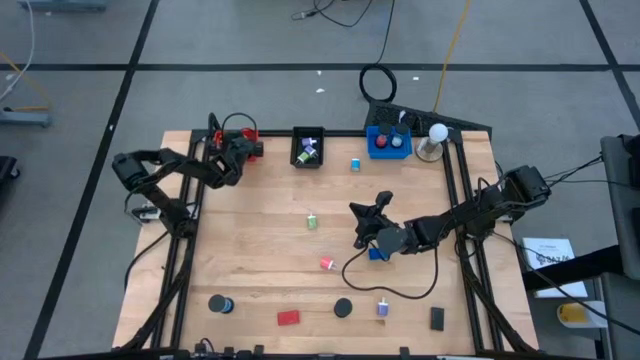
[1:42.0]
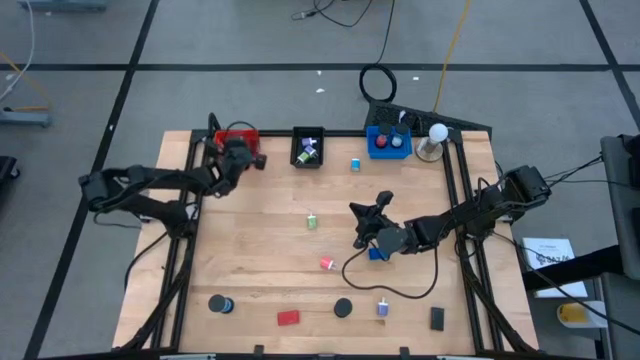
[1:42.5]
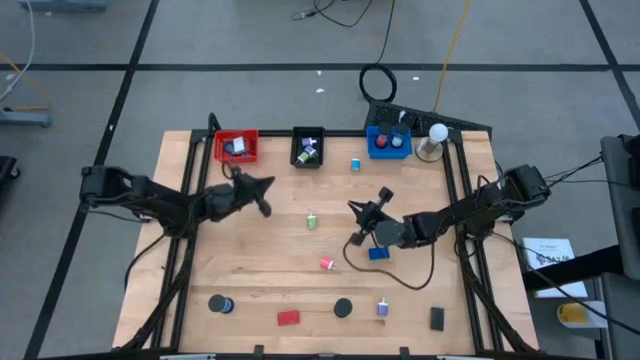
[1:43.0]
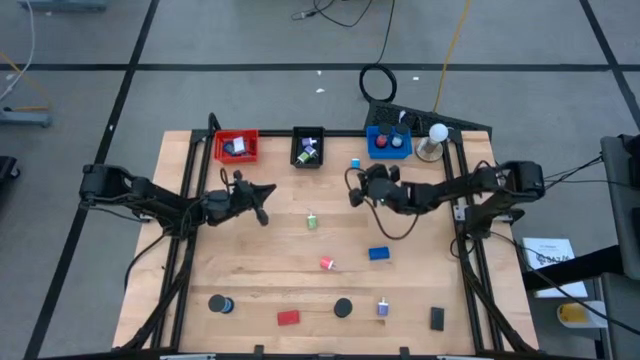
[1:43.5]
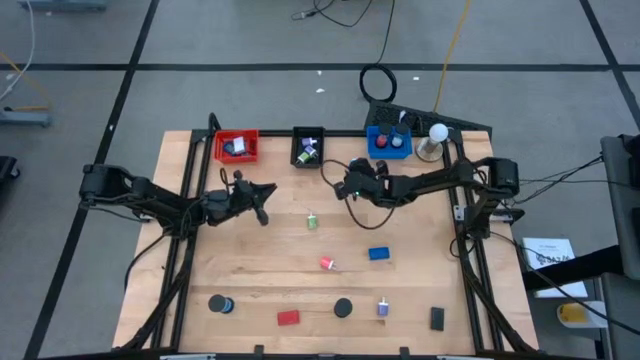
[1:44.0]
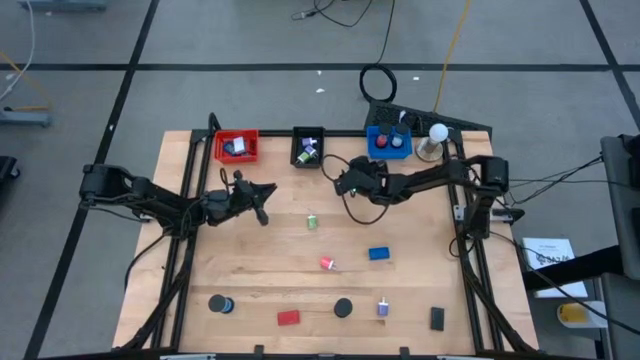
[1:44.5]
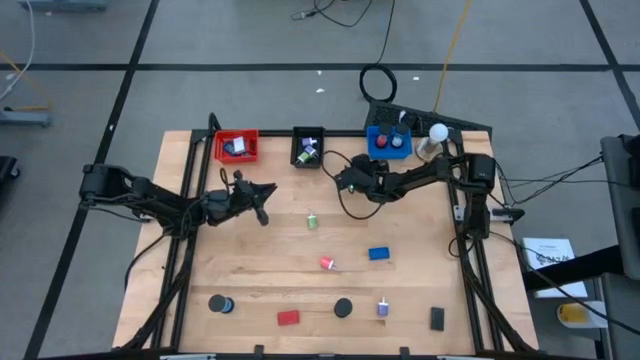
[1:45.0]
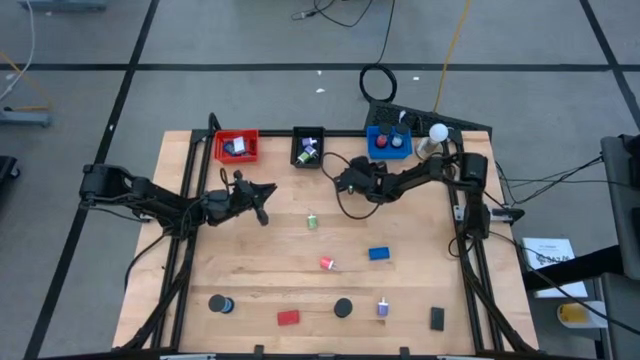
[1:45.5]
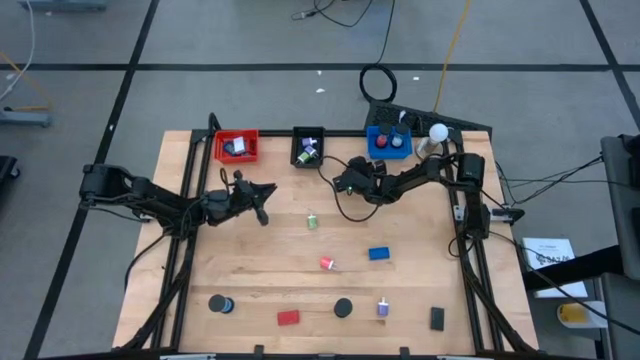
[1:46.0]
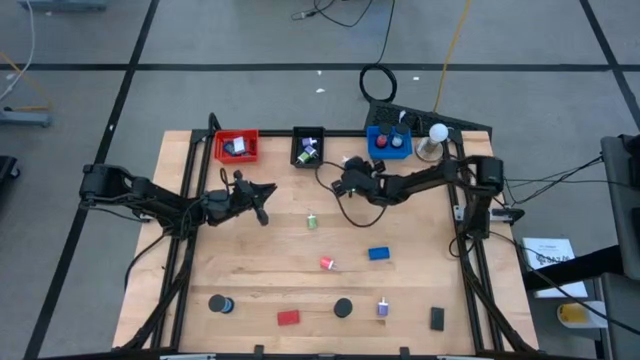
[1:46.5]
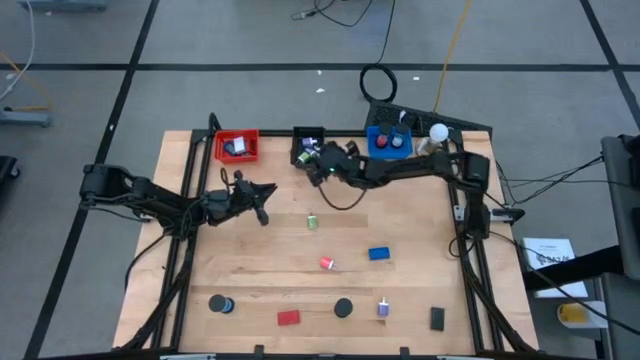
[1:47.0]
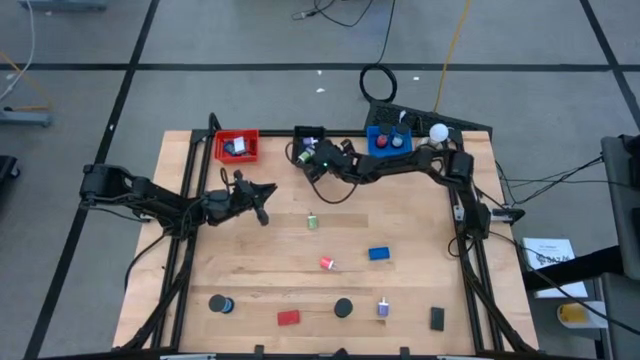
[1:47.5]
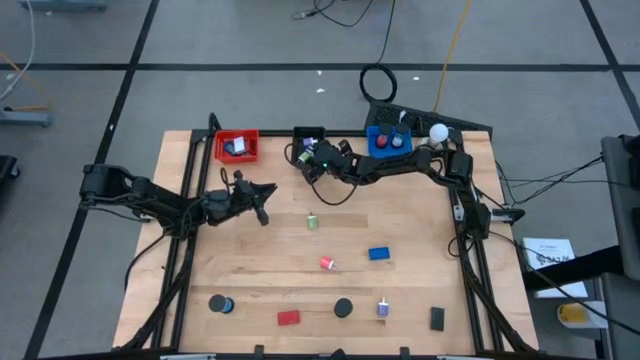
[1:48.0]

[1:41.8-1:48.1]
Task: Pick & Place Office items
Put the light blue charger adapter head into the black bin

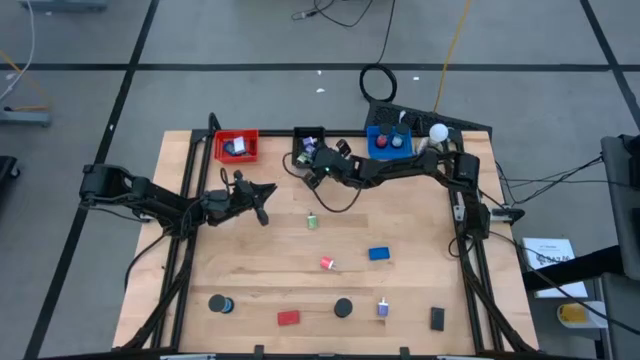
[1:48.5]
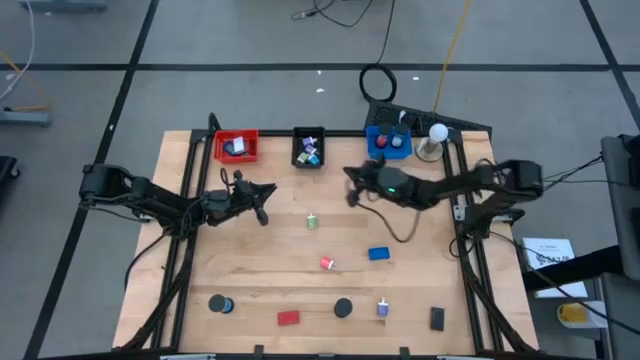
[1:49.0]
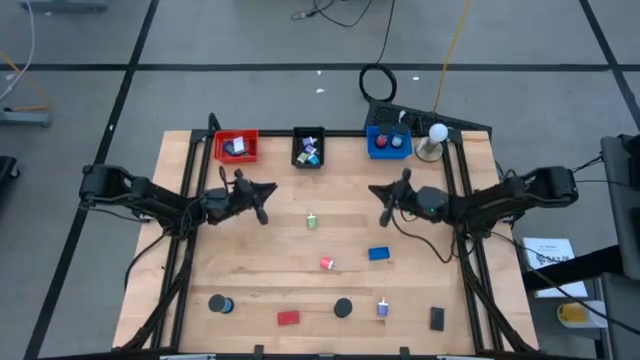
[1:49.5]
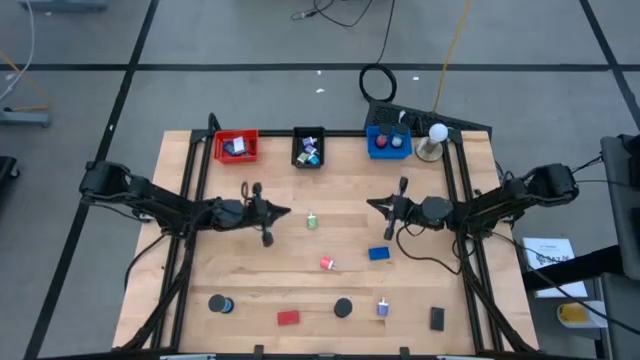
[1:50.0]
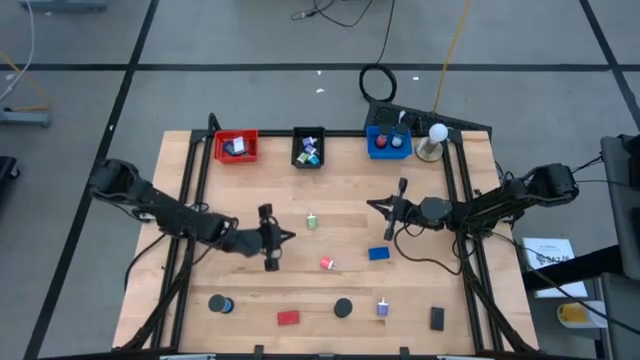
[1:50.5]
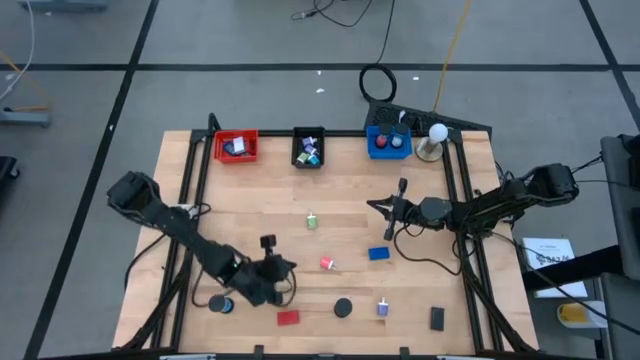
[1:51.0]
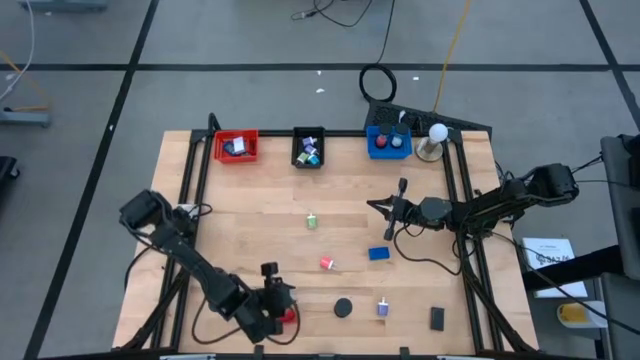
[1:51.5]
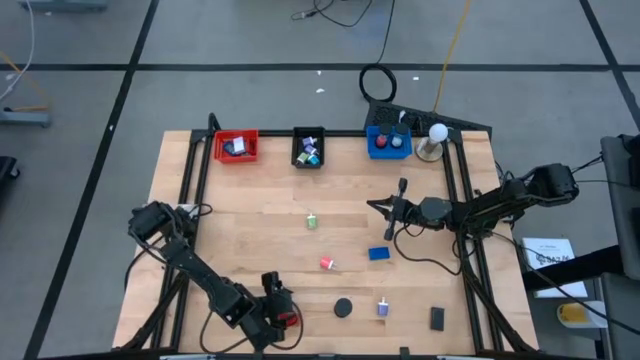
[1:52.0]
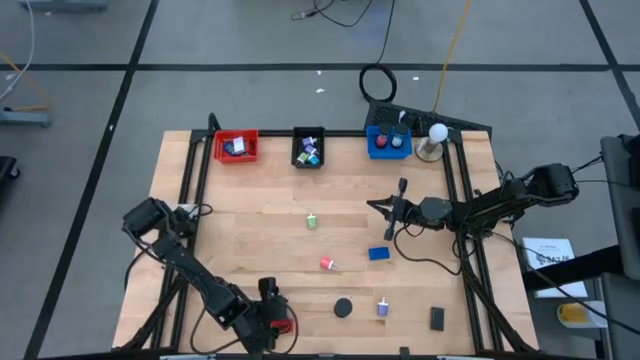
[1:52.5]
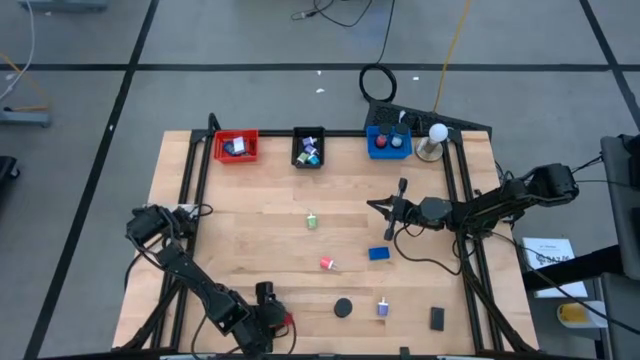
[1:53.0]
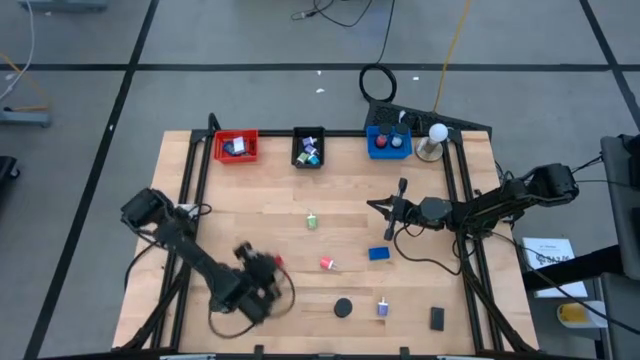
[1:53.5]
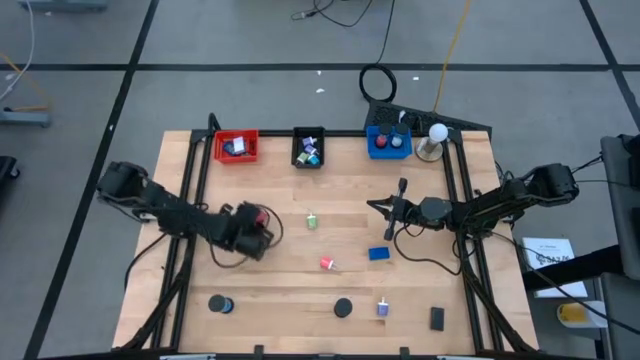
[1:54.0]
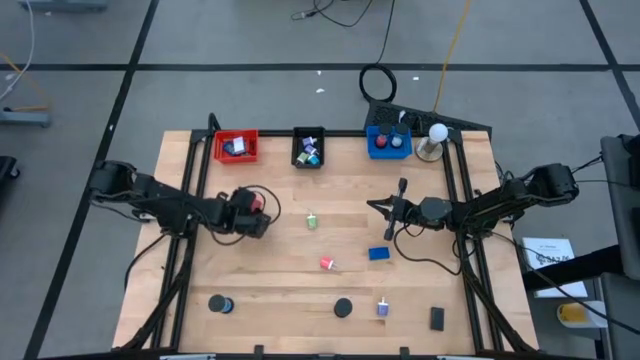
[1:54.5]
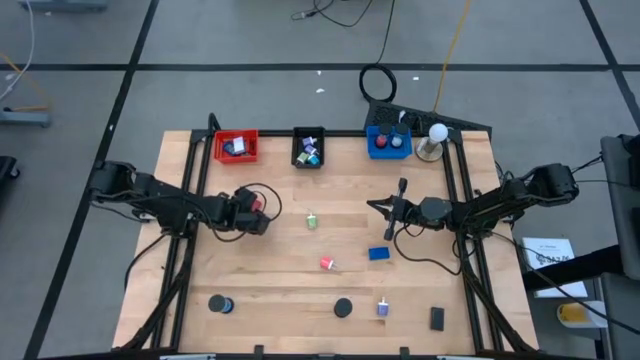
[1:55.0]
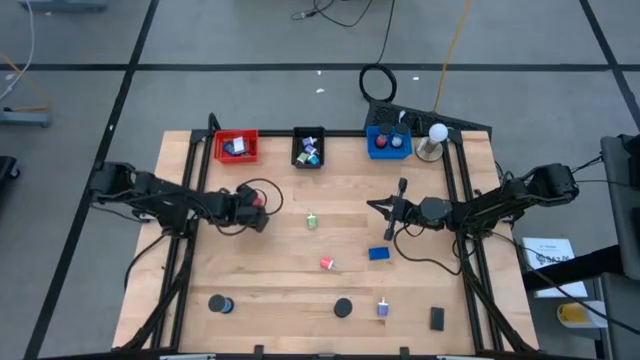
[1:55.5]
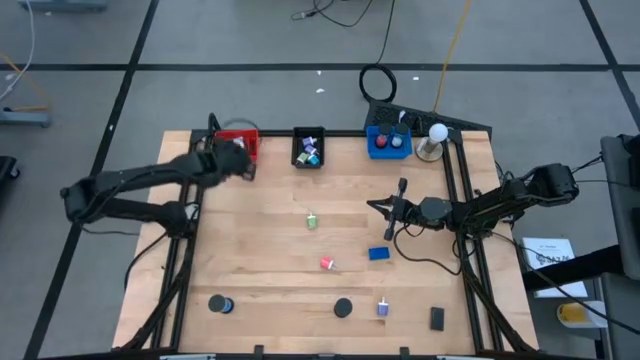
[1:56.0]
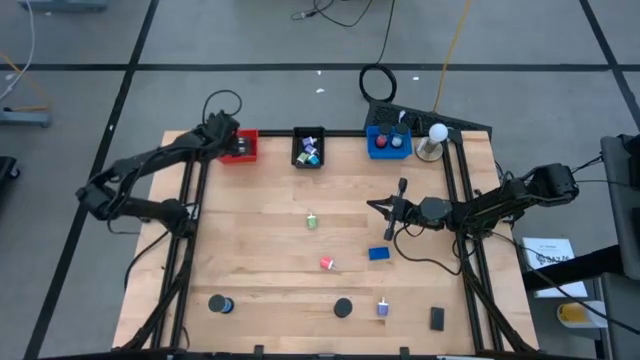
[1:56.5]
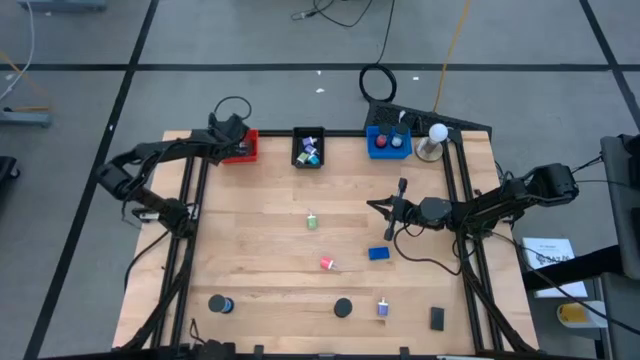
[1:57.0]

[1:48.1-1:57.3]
Put the red digital clock into the red bin

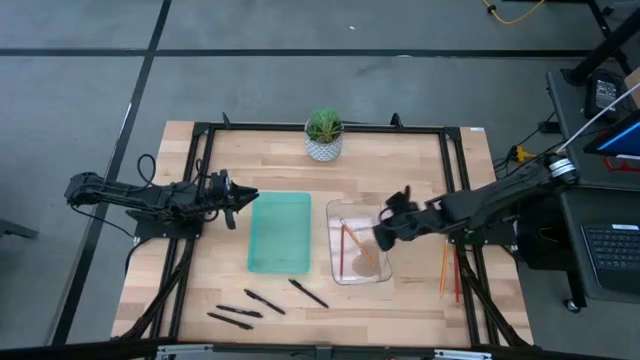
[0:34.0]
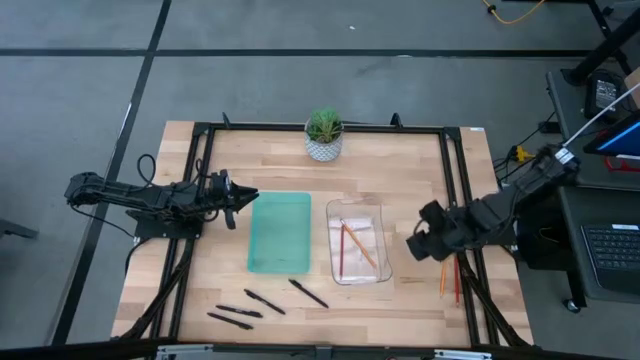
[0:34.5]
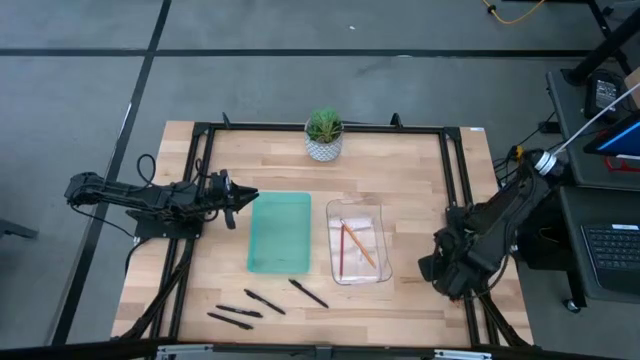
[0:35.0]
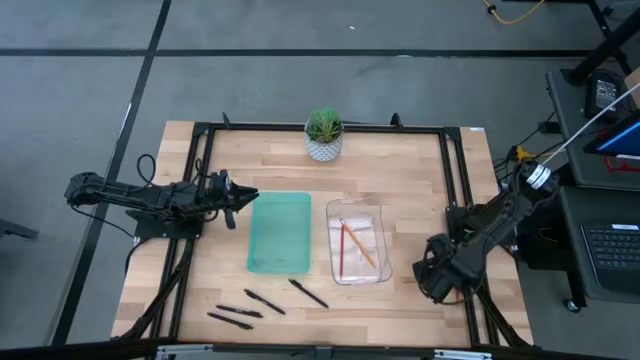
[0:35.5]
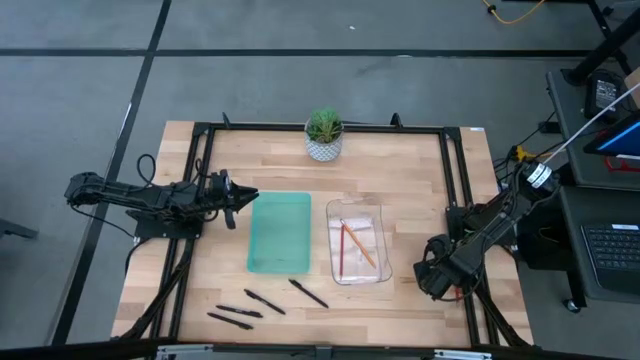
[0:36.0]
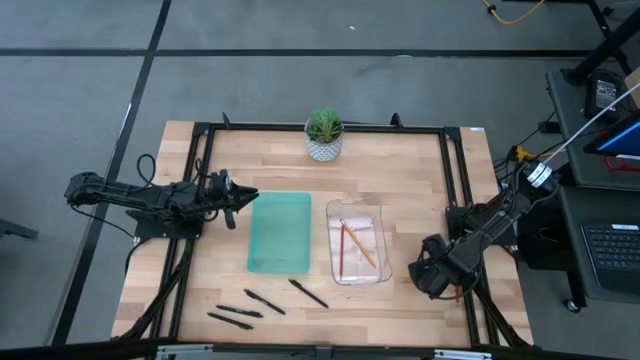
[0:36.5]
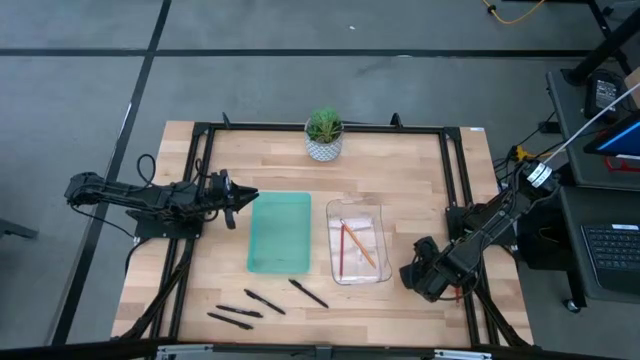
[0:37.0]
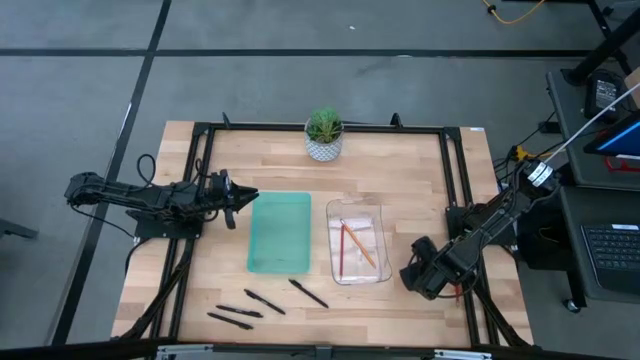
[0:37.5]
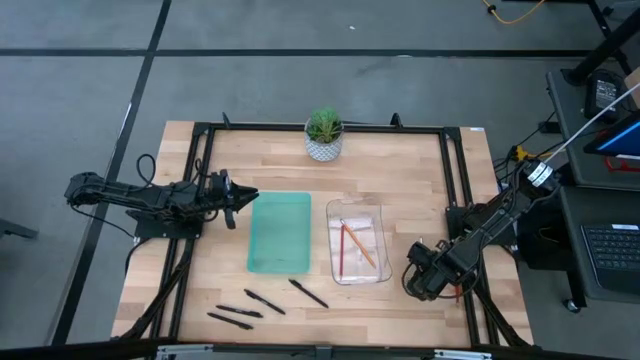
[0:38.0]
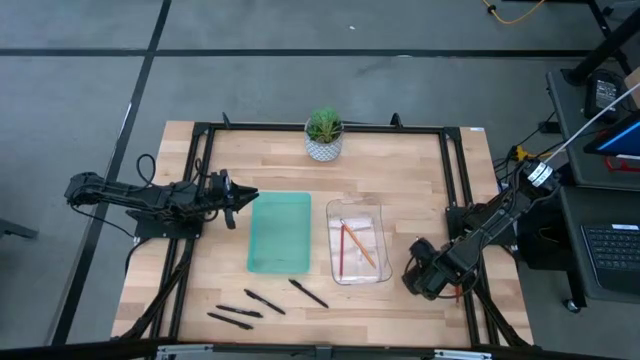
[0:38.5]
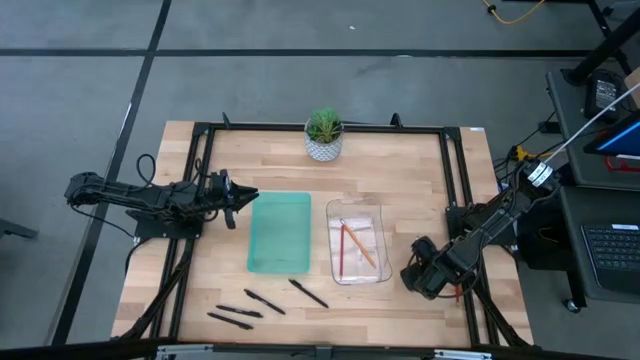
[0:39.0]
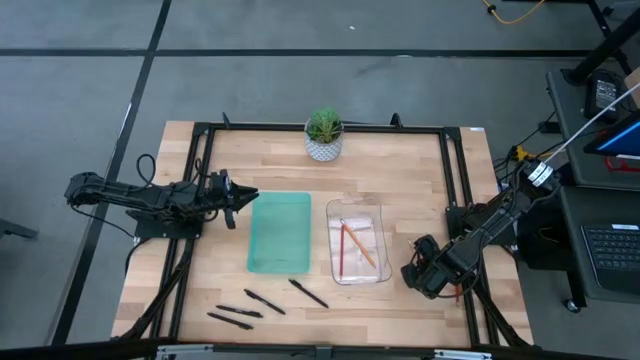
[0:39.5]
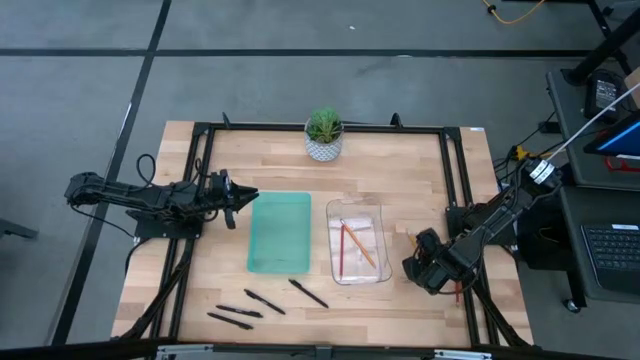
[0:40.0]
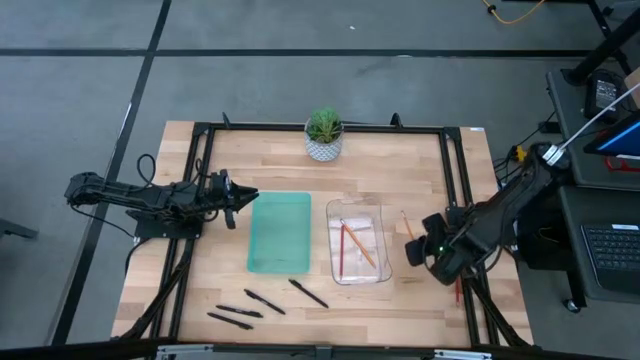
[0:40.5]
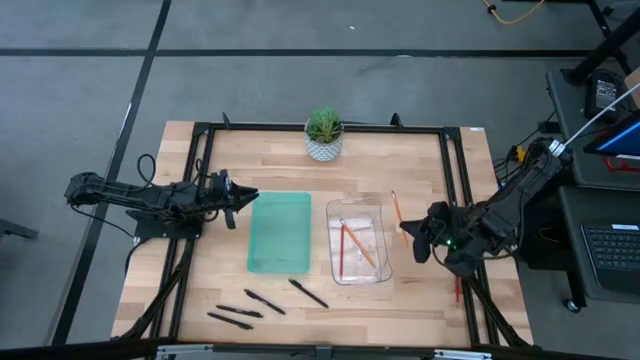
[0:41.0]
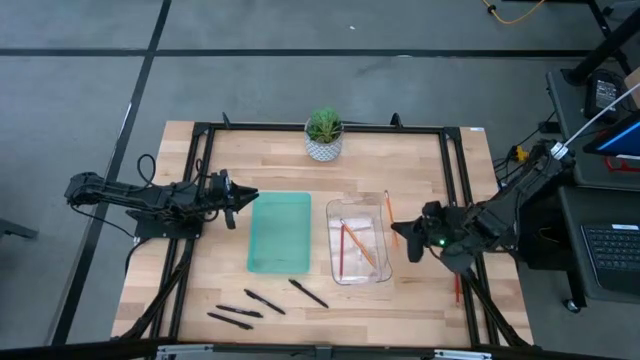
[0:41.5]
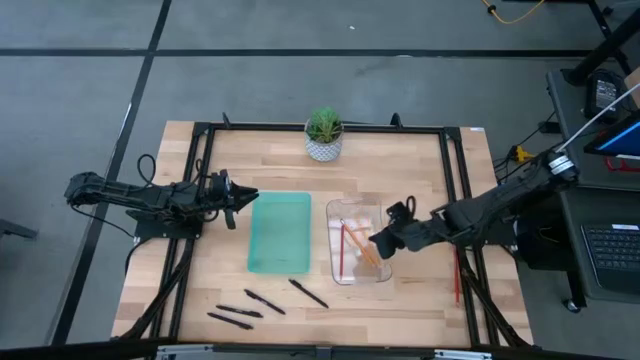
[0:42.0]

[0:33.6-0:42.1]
Task: Sort pens & pencils
Put the orange pencil into the transparent bin
